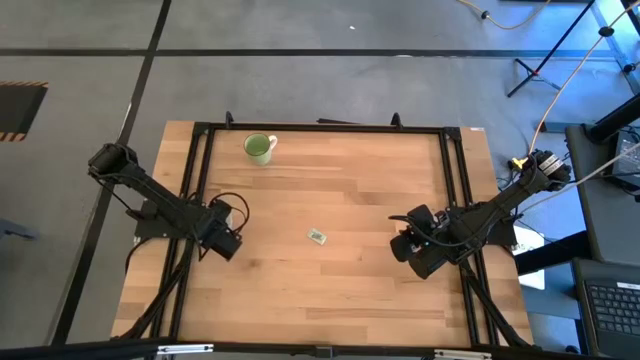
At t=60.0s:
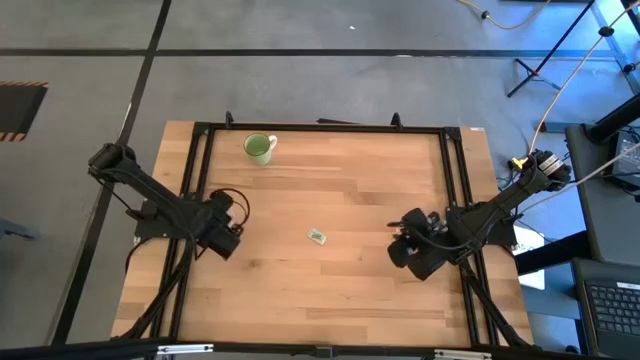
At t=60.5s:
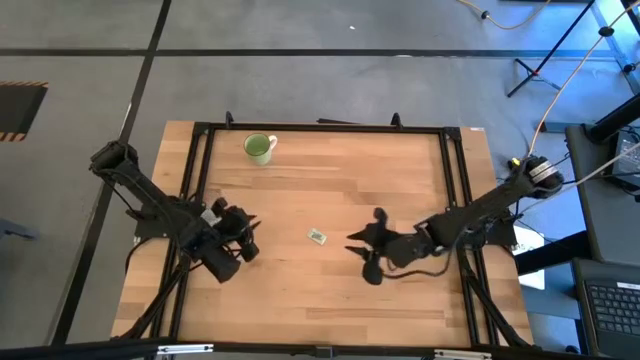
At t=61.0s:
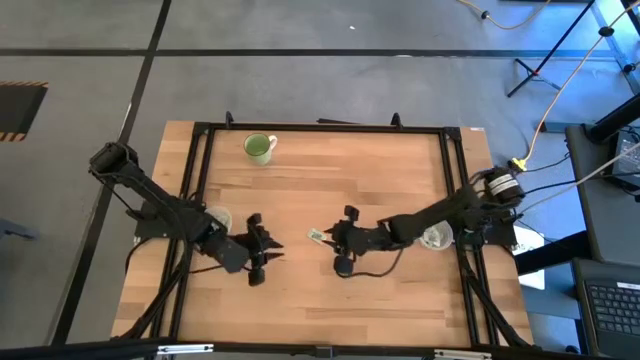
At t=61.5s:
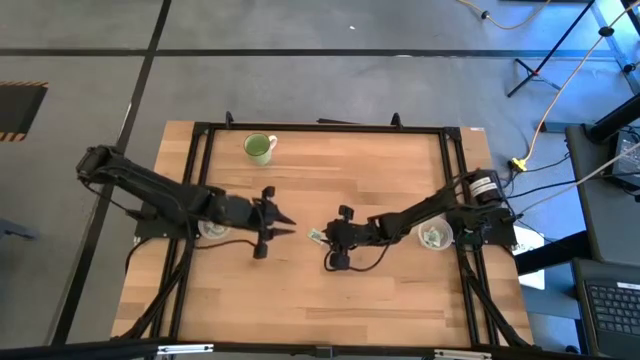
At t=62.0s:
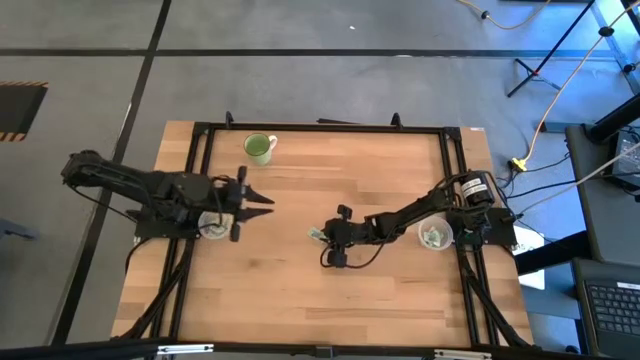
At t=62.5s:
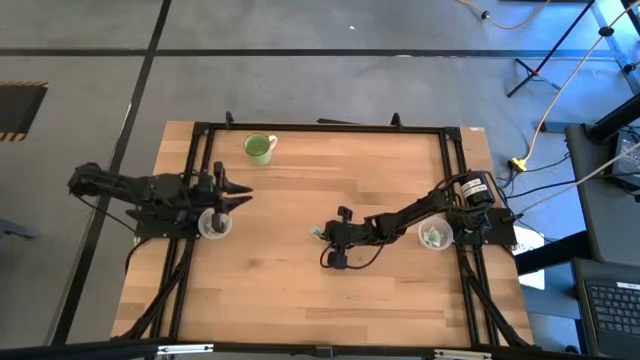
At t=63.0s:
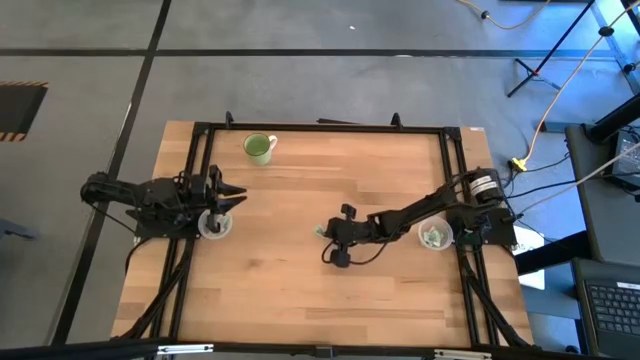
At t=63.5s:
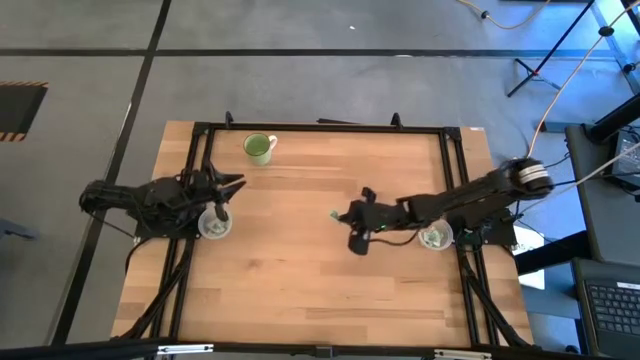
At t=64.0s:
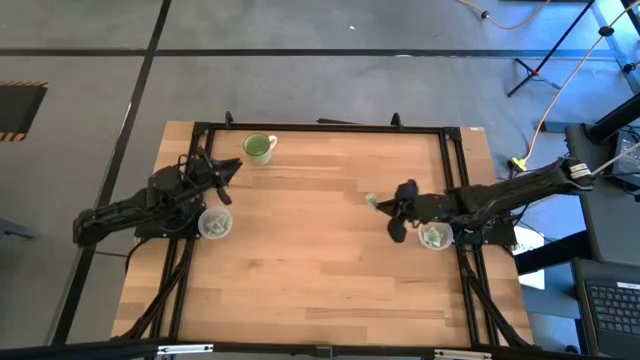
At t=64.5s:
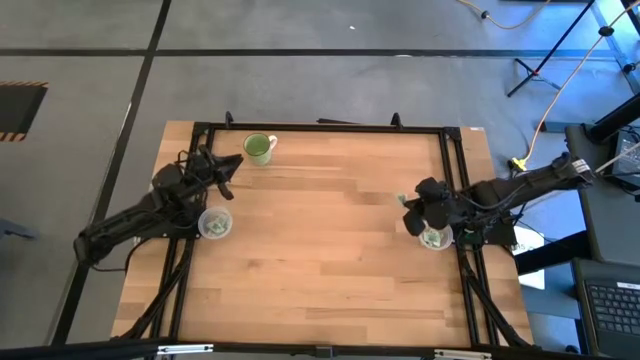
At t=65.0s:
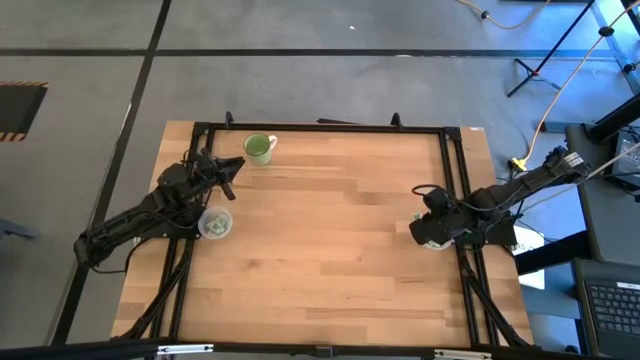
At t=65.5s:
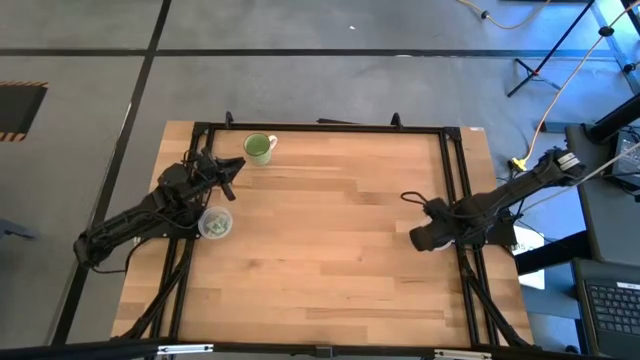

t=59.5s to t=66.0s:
Task: Pick and place items into bin
Put the white stevia packet into the right transparent bin

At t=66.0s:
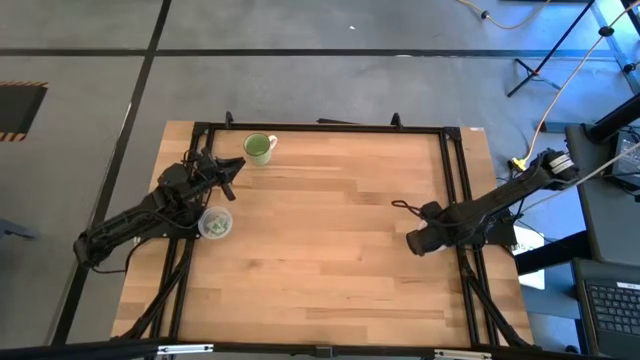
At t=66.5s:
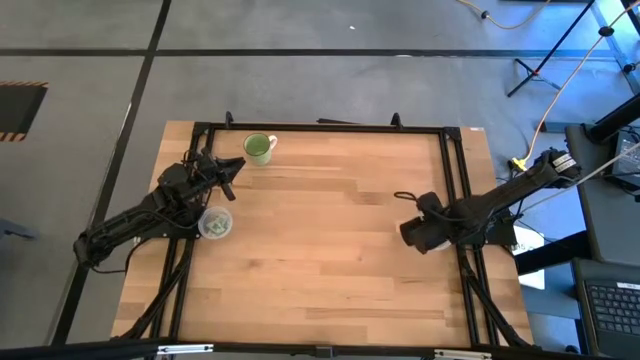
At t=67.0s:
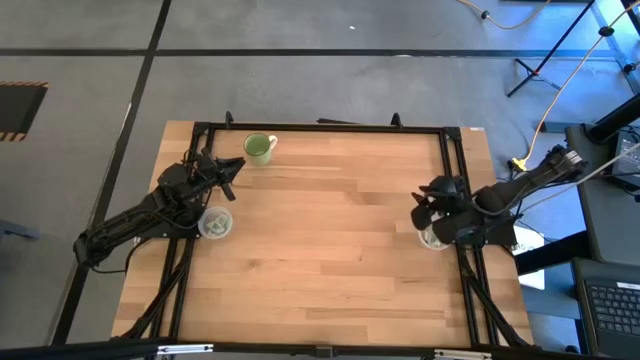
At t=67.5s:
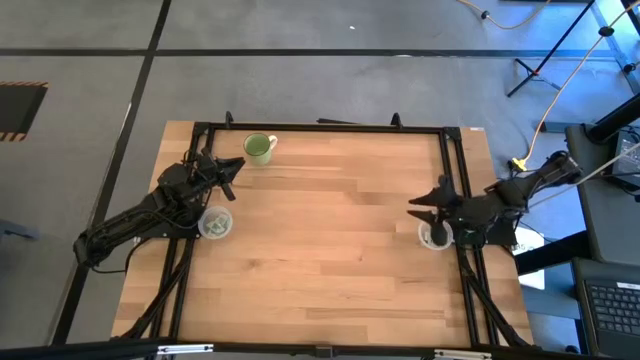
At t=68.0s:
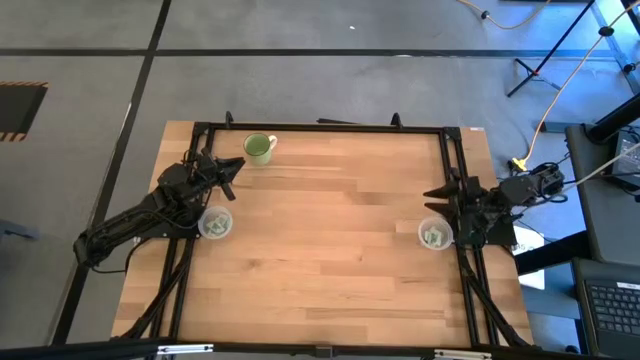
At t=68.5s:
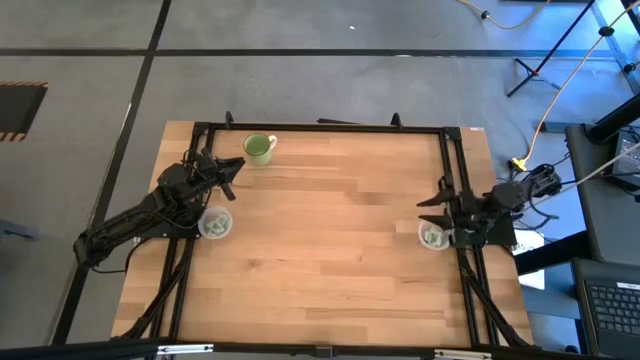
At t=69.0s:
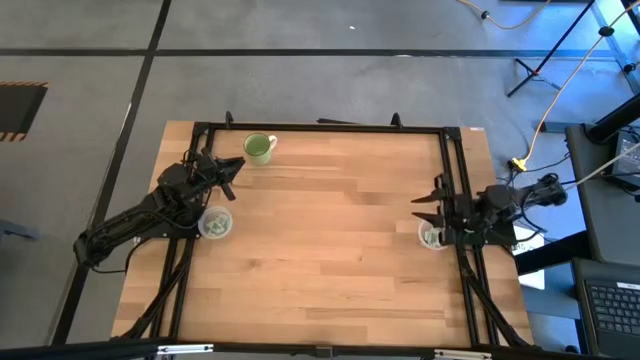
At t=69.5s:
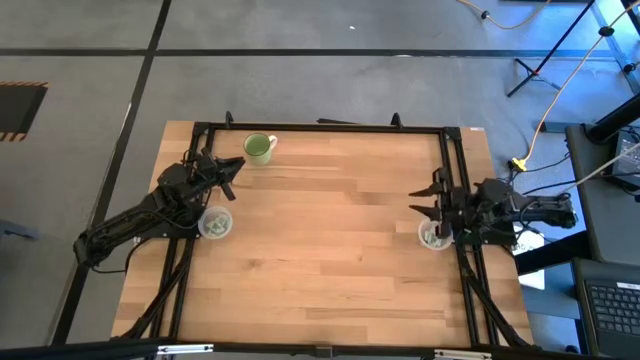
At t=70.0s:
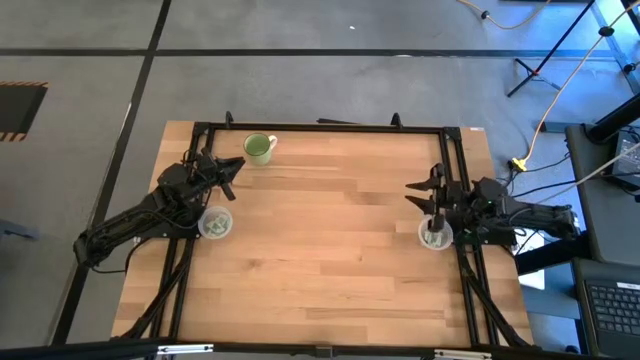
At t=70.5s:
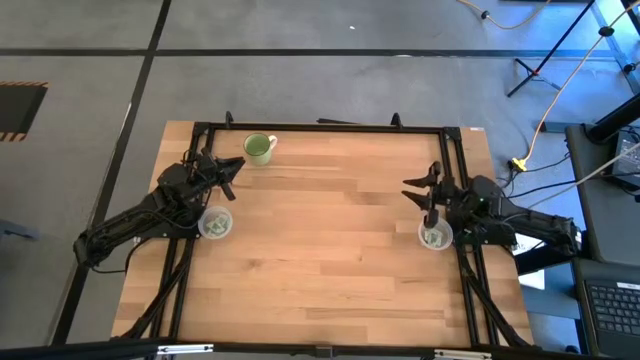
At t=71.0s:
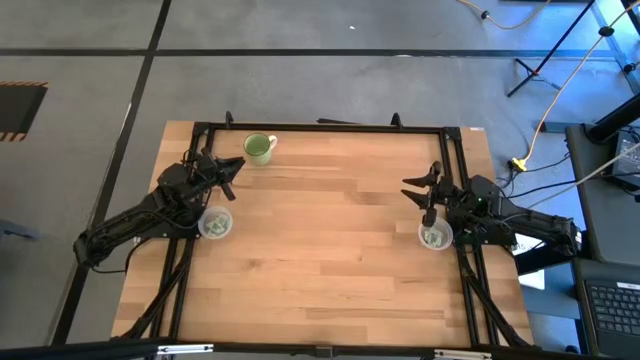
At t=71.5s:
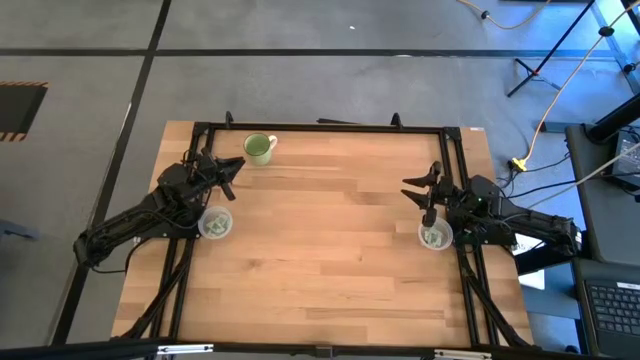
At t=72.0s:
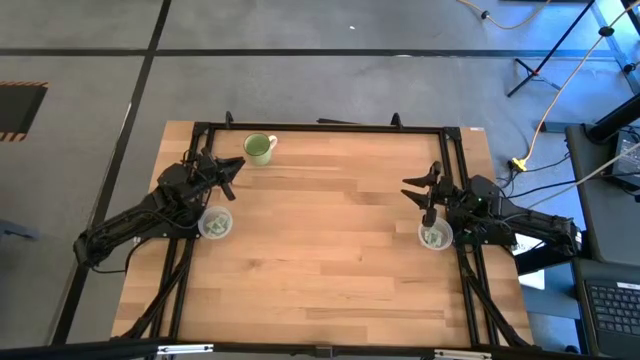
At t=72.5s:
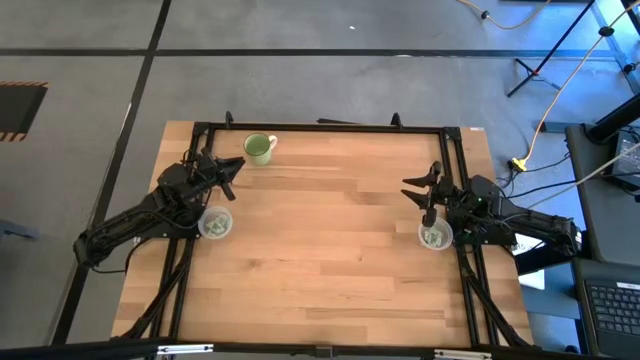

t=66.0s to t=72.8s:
Return to Home Position

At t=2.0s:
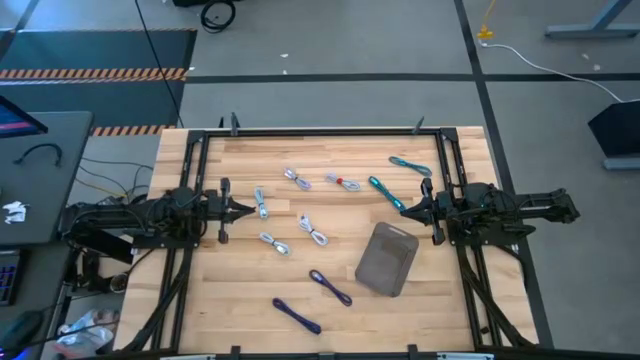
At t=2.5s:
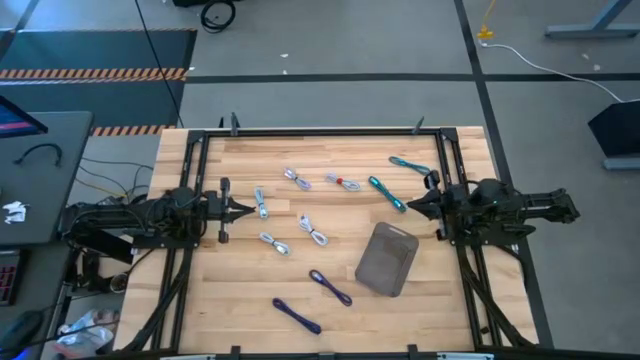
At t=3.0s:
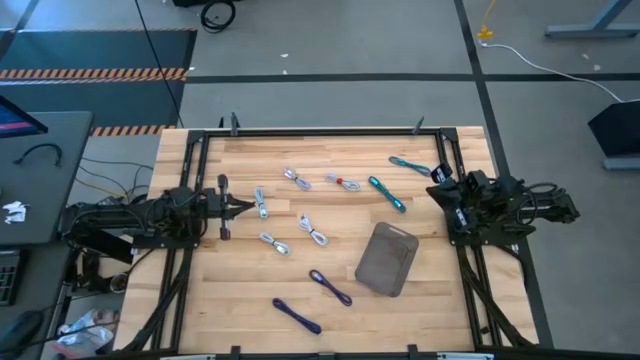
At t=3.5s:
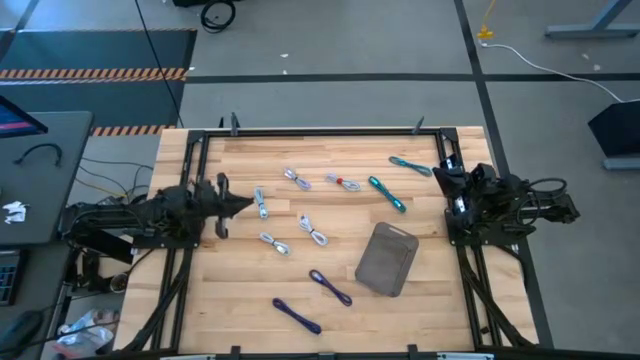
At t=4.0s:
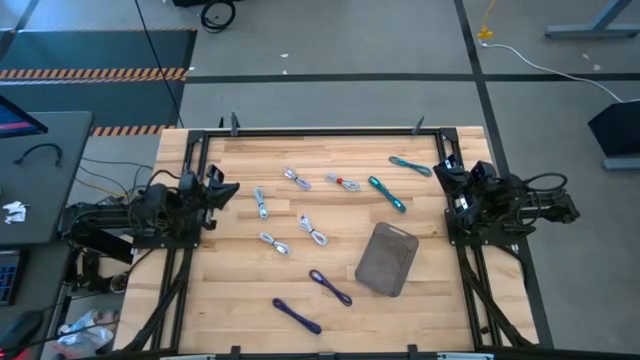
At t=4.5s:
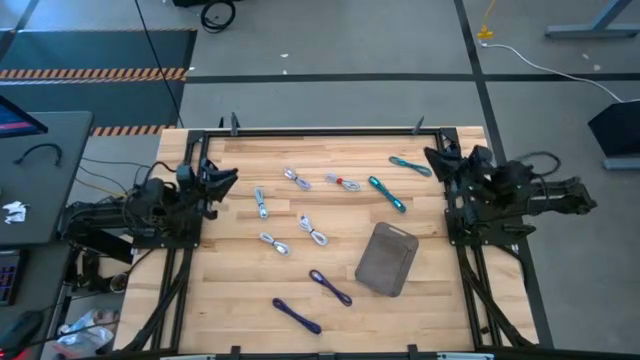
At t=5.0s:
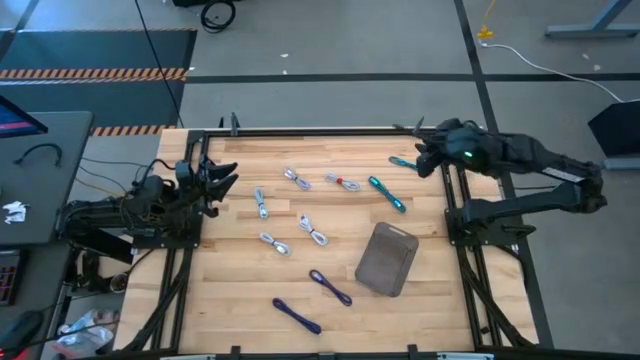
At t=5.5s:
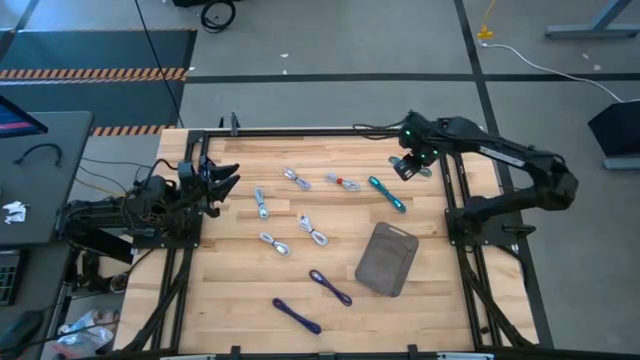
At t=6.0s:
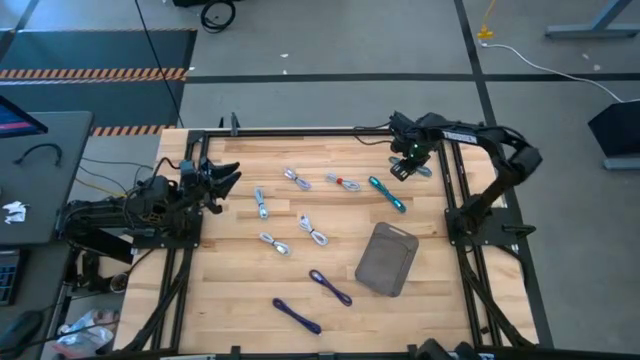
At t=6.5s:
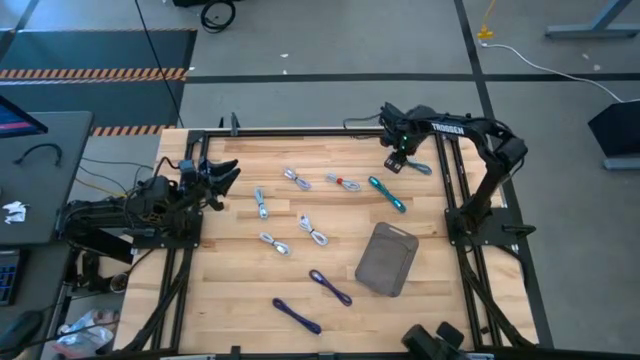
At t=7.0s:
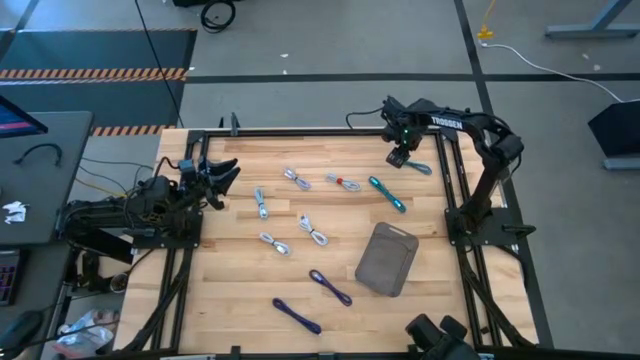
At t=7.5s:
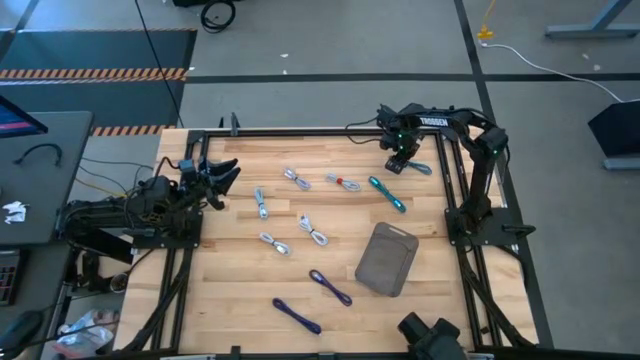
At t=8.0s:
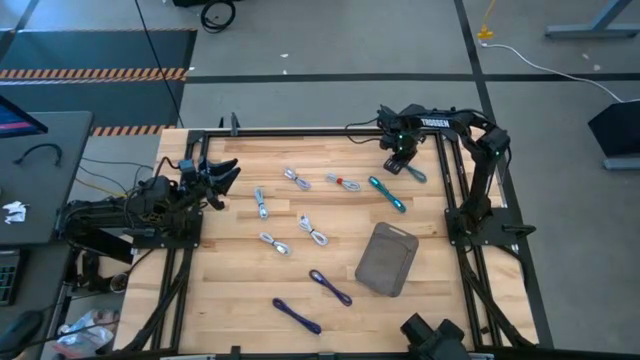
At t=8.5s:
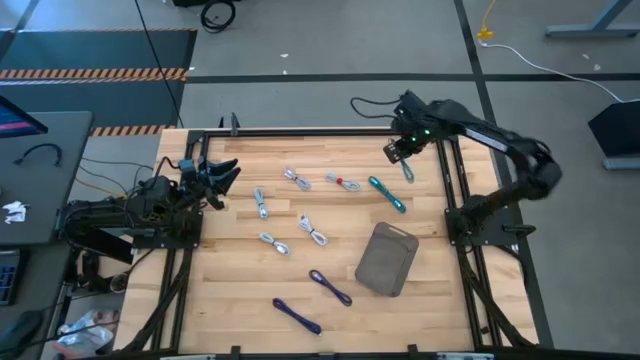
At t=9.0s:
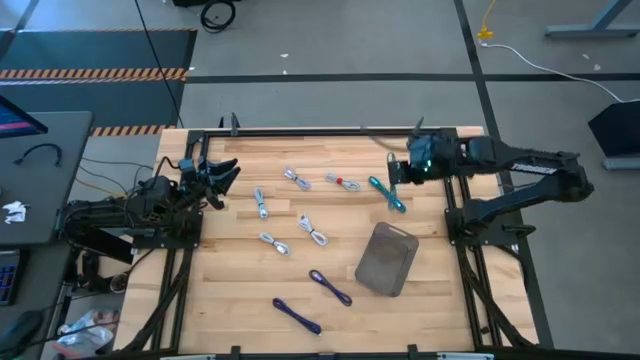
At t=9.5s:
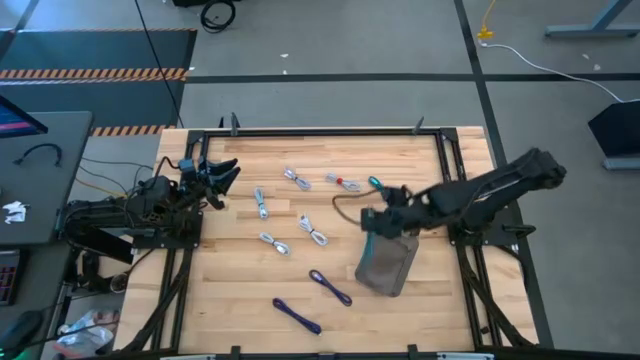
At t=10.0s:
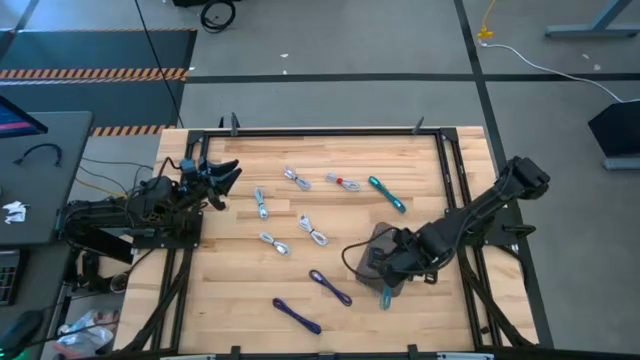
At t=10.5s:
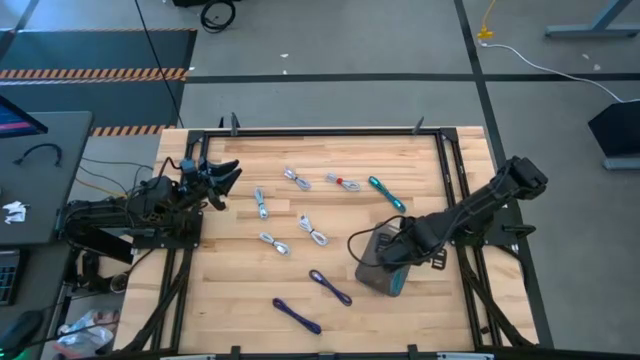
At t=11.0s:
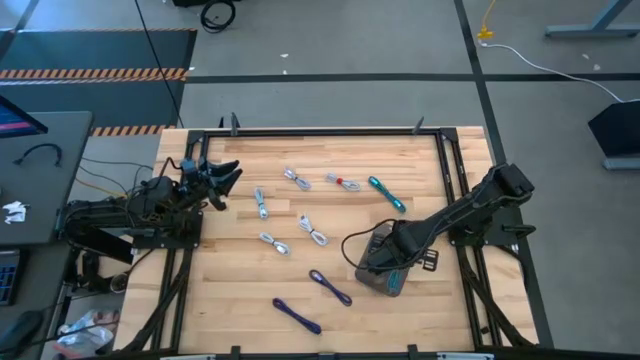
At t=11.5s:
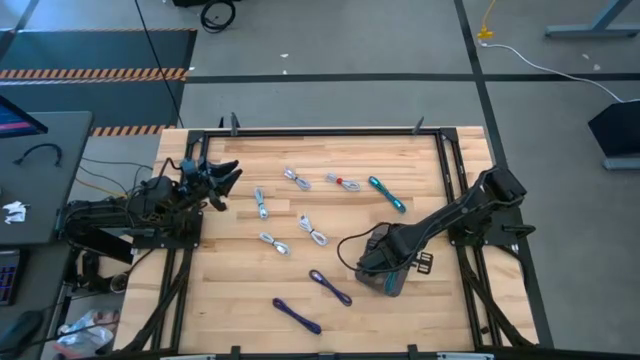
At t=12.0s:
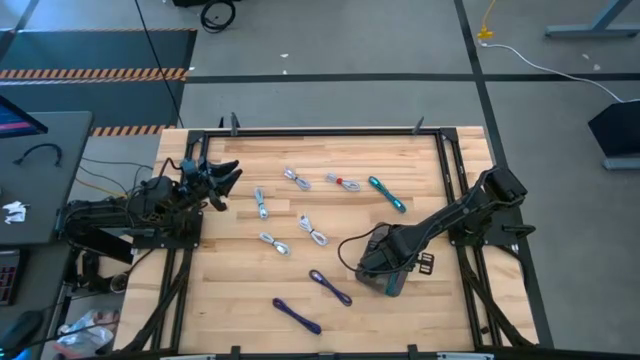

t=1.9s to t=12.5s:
Task: Pick and place USB-C Cables
Put the top blue charger cable into the gray bin
